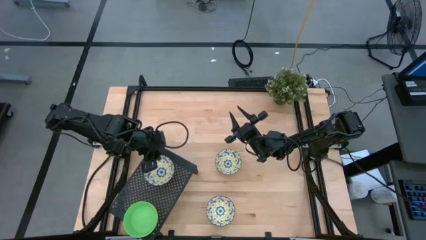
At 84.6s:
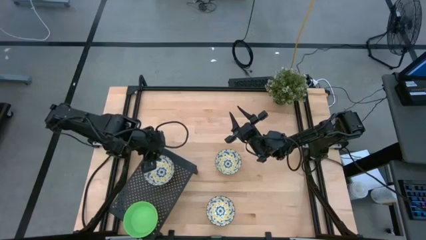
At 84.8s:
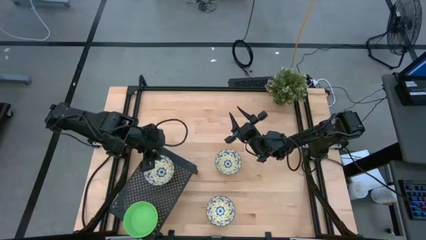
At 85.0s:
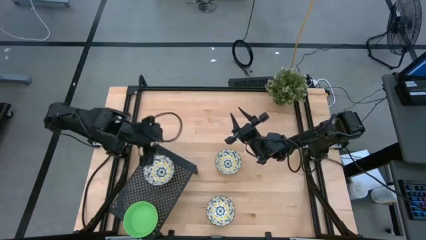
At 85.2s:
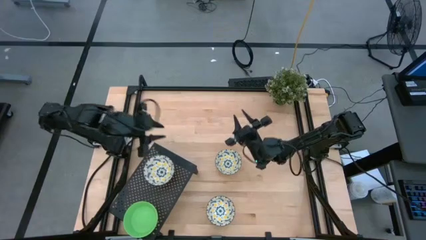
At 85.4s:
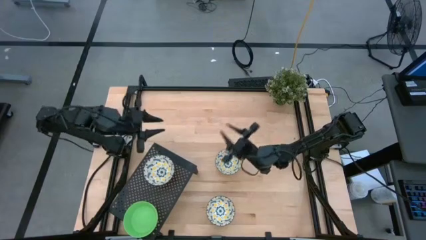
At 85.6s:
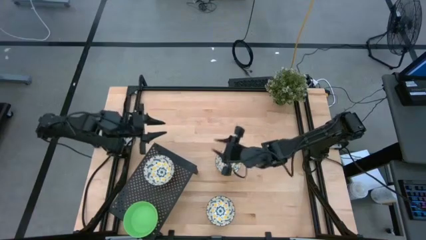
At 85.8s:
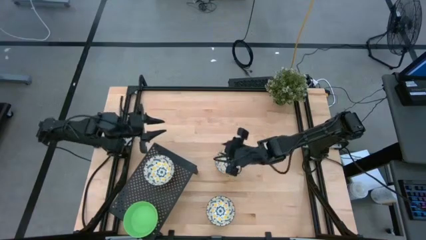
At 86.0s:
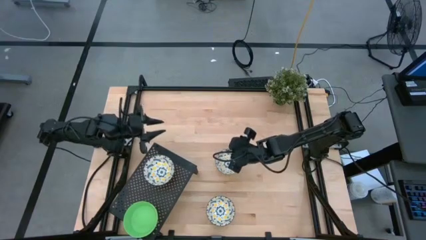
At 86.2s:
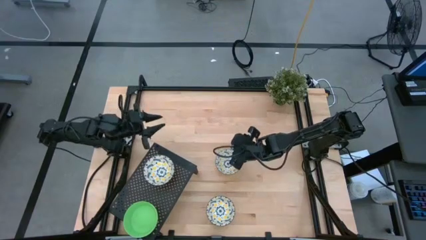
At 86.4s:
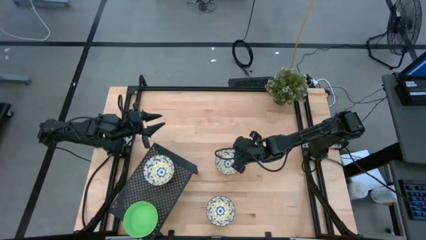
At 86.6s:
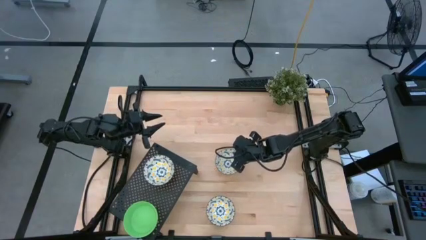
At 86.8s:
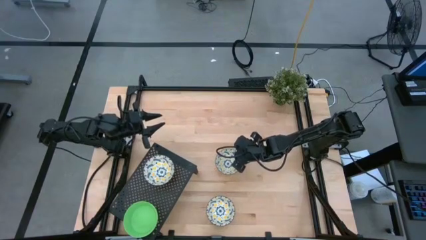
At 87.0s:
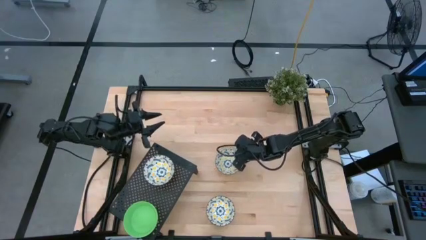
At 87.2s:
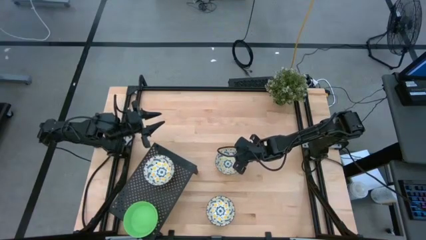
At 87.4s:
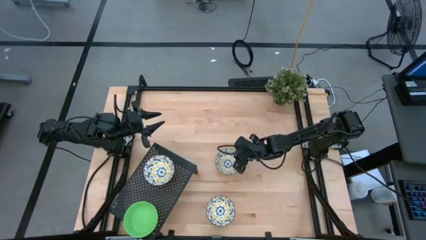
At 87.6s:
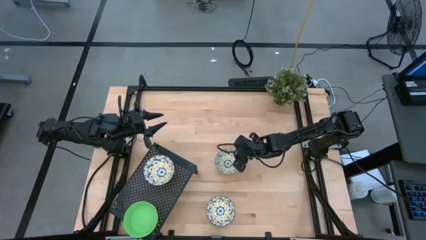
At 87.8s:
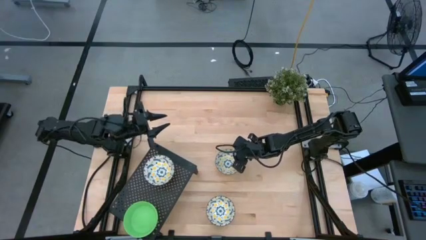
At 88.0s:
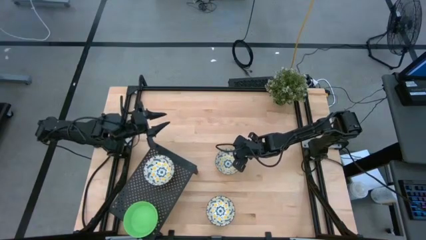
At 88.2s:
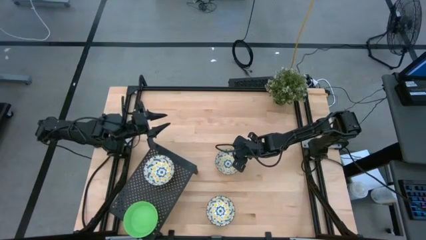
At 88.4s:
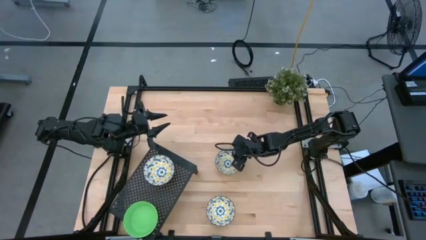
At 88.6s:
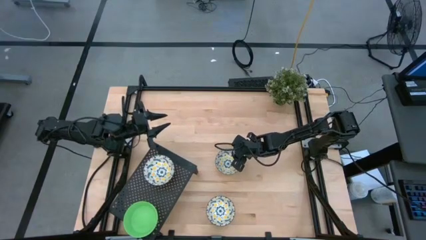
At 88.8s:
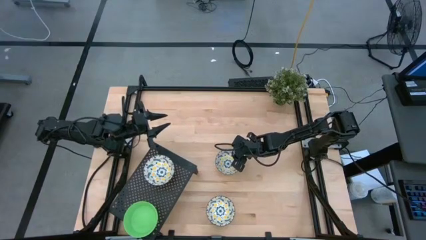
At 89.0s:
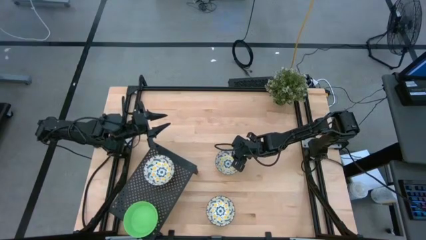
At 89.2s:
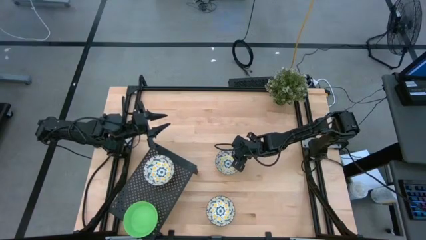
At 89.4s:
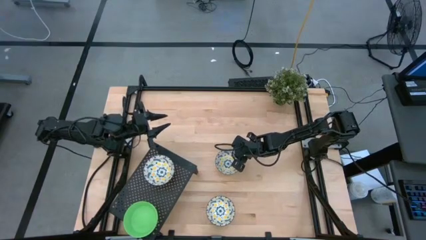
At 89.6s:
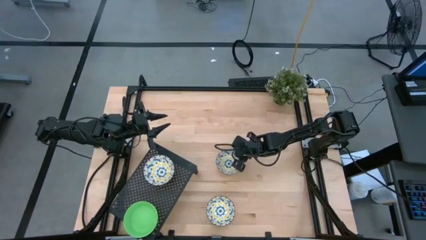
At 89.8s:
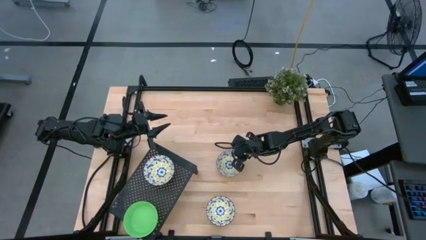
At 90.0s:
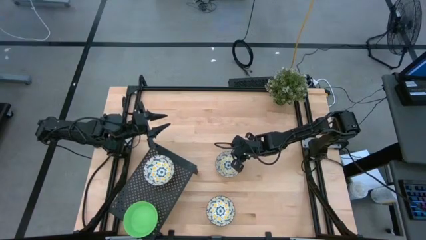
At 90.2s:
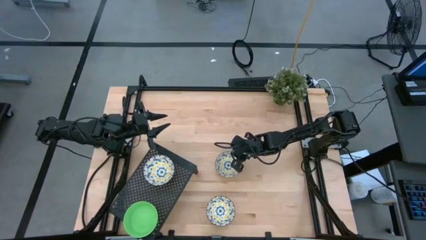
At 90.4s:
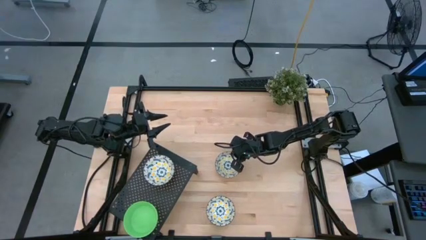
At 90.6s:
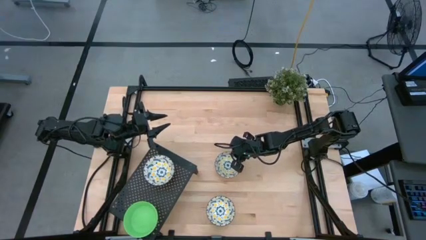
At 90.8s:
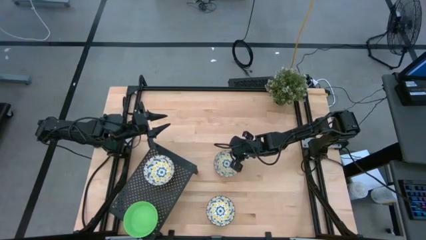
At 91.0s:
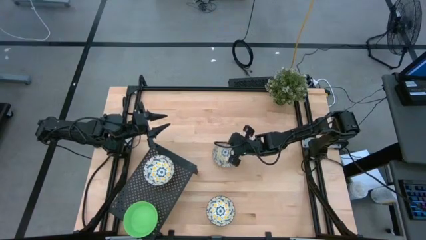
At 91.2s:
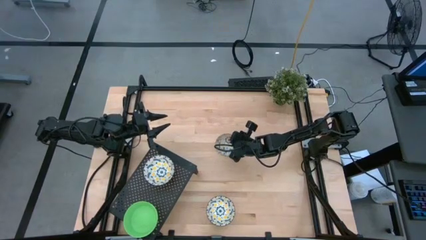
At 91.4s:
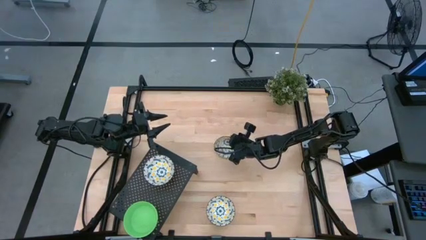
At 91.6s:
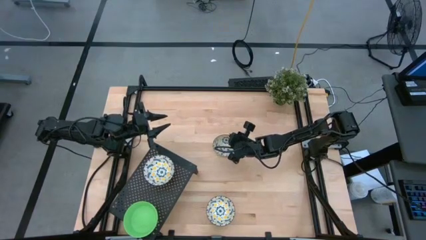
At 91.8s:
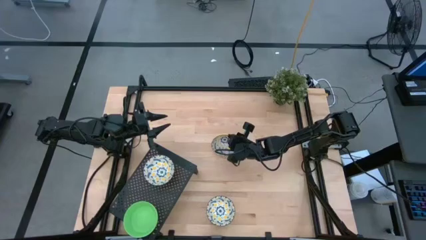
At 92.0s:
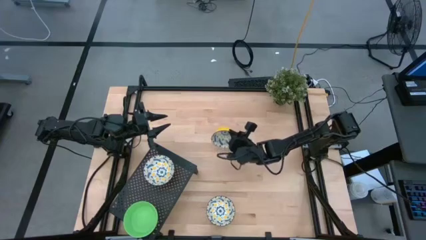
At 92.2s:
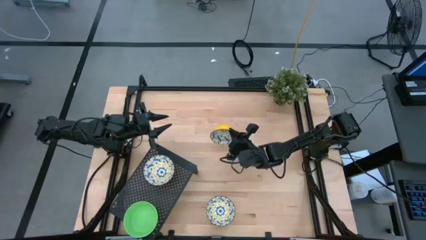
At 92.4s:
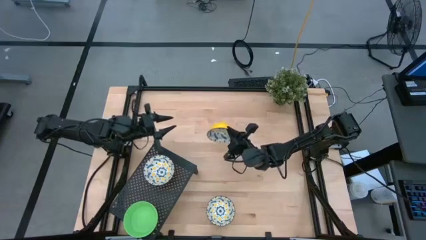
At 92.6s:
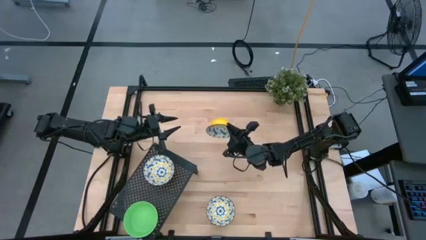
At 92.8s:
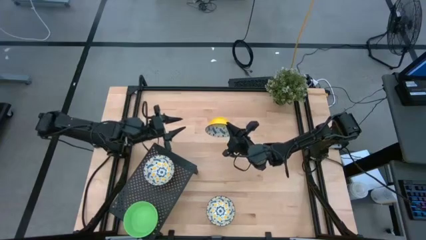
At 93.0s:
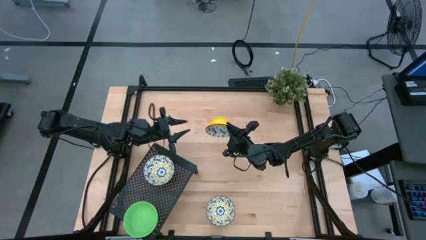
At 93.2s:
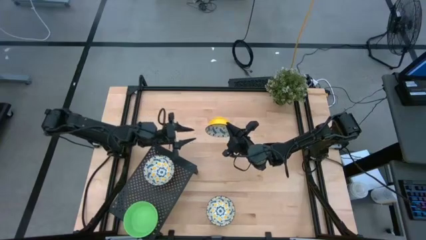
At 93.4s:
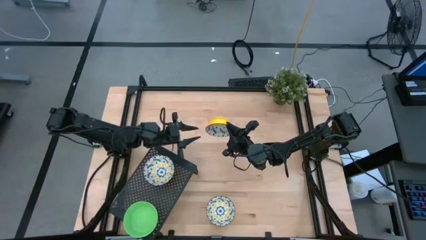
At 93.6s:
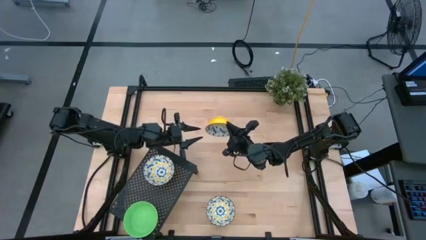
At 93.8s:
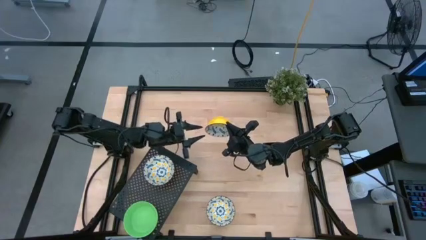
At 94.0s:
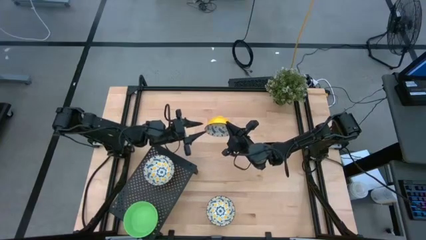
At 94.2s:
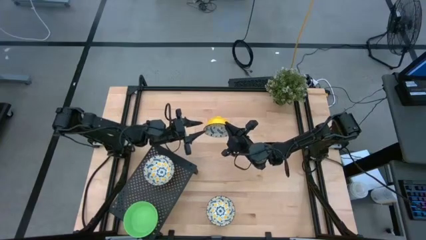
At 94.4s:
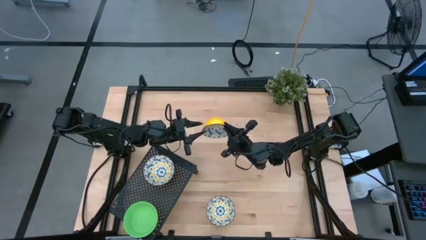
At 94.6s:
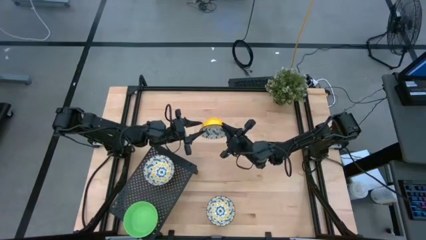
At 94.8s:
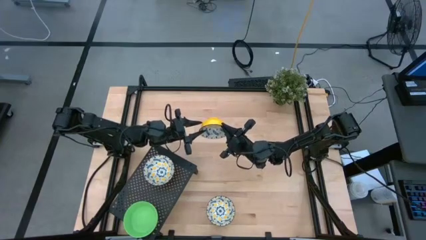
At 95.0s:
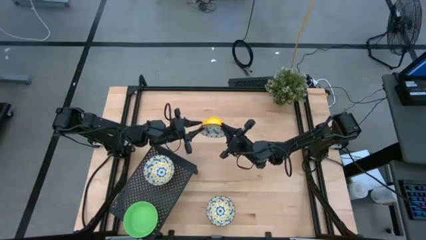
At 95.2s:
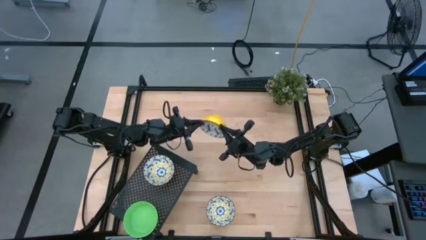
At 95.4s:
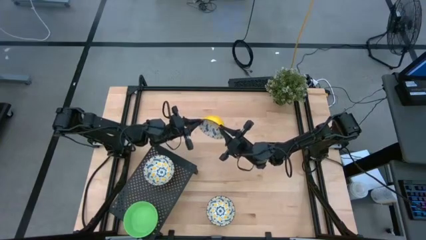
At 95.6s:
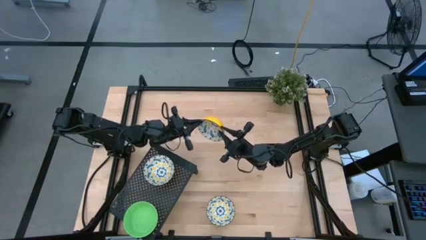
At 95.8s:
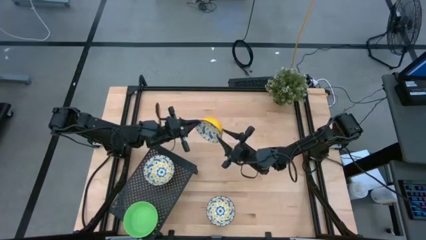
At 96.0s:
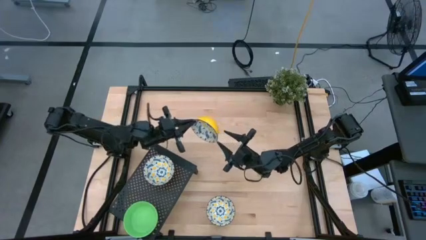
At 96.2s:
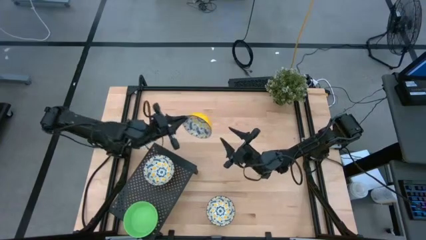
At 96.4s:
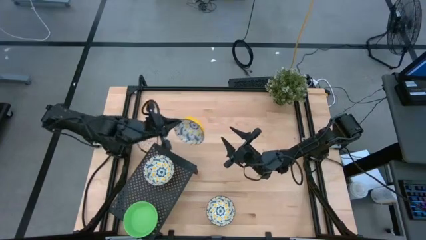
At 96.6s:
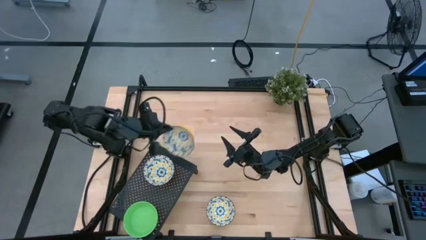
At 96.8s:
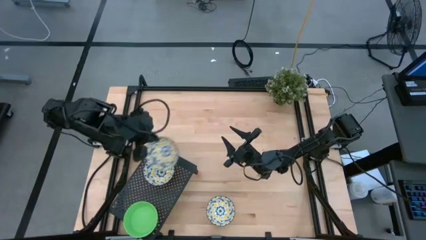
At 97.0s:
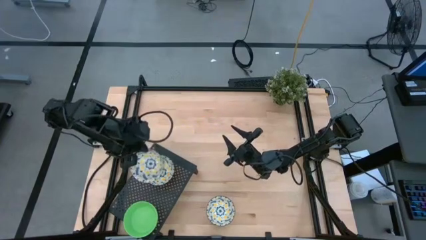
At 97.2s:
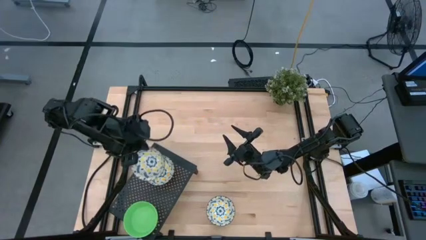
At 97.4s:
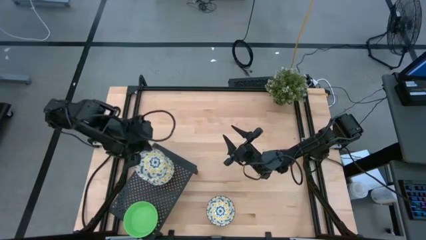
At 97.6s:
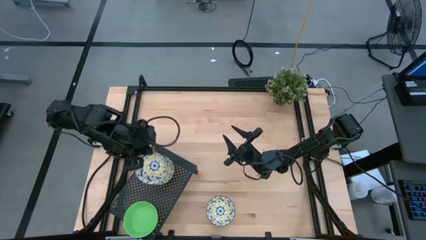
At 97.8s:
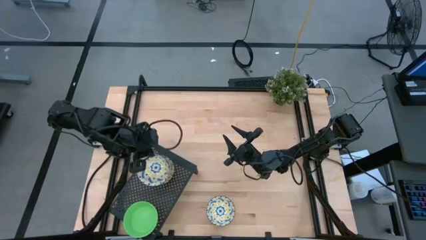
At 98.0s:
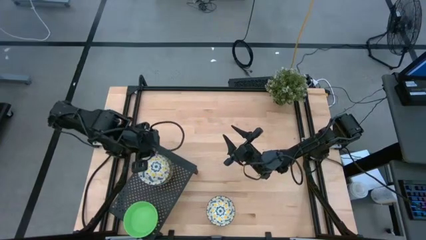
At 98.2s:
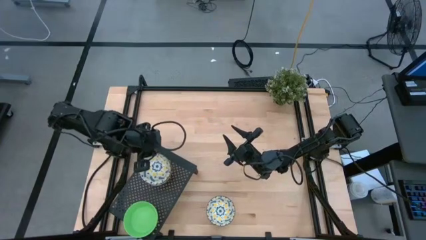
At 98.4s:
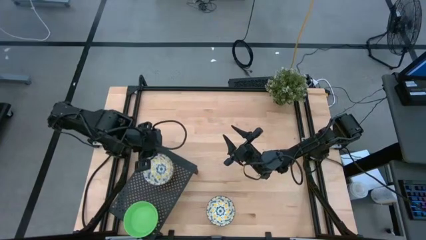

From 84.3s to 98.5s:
Task: Pick & Place Mini bowls
Stack the top yellow patterned bowl on the yellow patterned bowl on the shelf

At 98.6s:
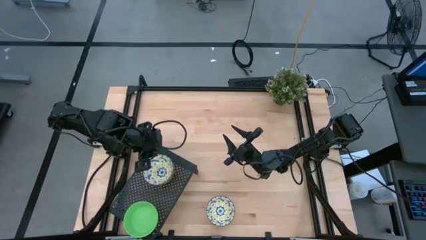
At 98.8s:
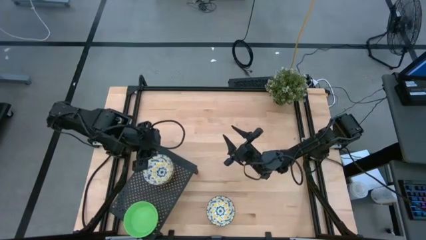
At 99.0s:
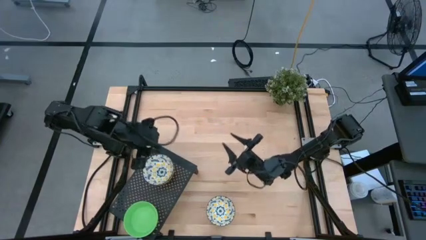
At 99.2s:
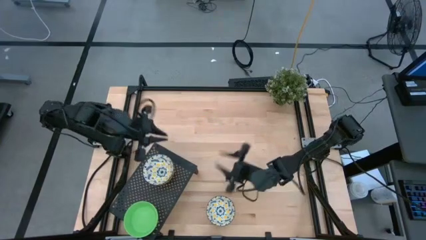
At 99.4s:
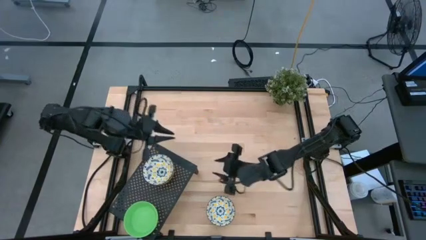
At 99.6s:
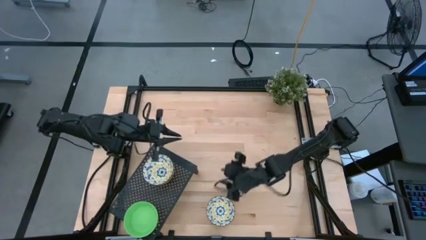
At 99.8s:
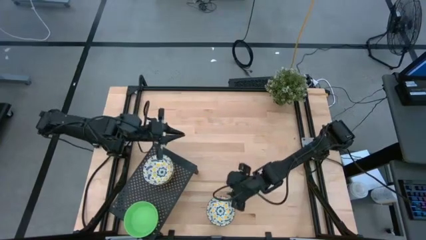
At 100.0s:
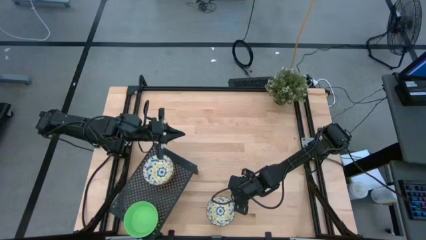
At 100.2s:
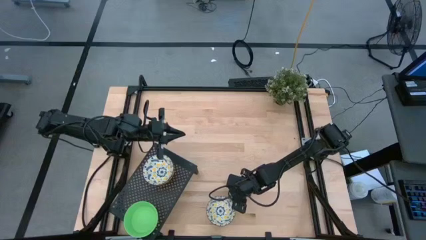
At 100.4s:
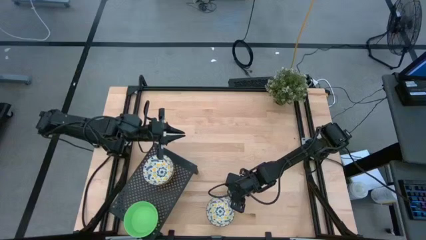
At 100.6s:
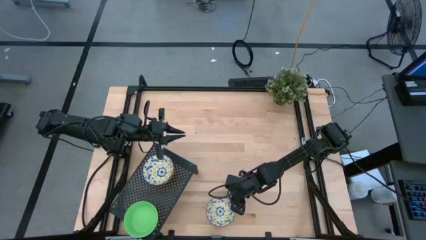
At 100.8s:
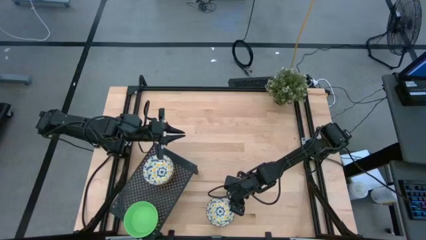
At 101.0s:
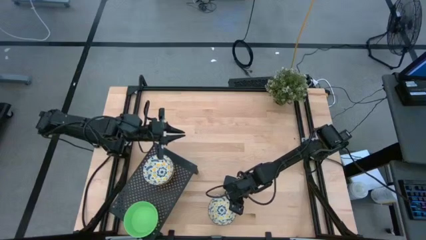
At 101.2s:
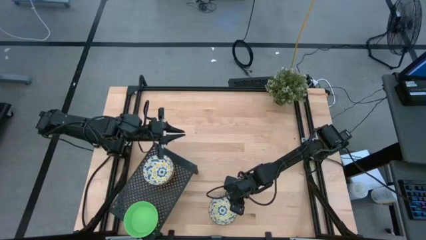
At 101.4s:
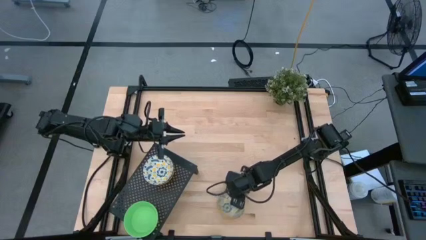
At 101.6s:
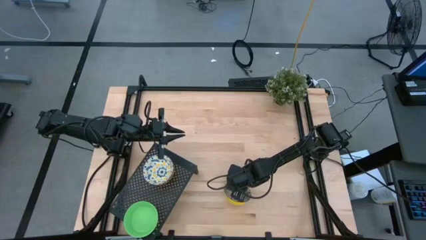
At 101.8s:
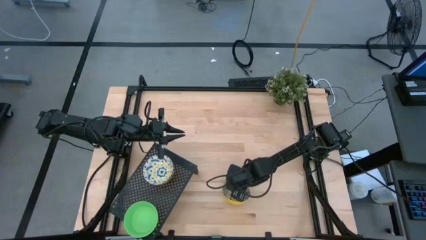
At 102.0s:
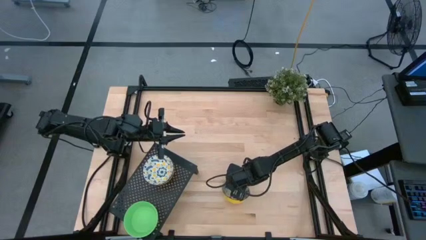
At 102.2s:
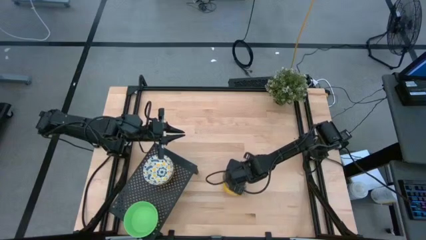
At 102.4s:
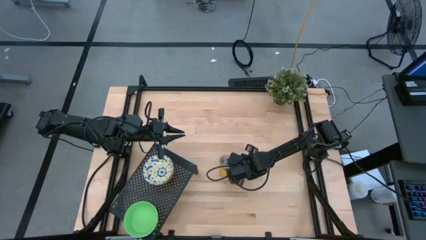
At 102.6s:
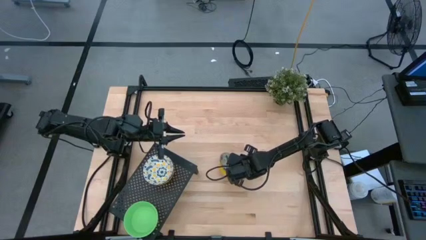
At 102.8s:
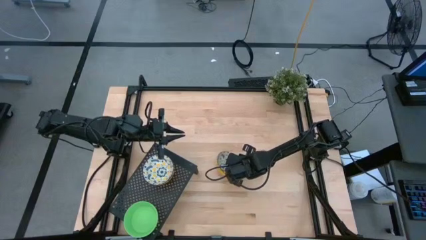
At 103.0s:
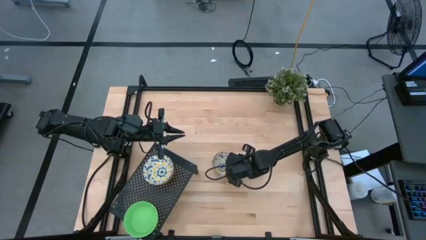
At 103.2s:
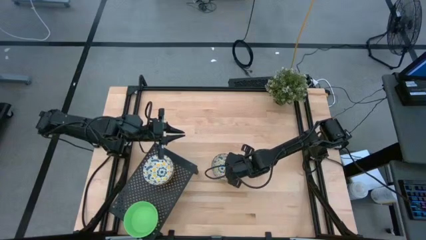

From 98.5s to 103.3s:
Stack the yellow patterned bowl on the yellow patterned bowls on the shelf
